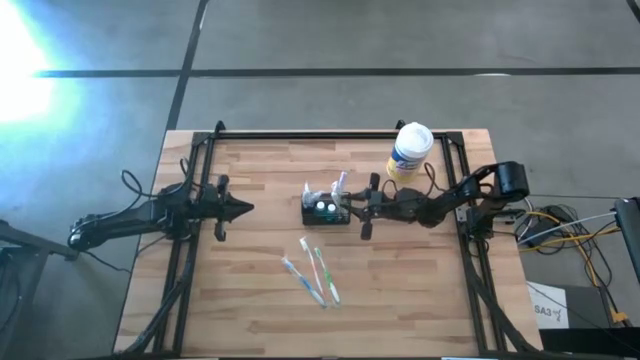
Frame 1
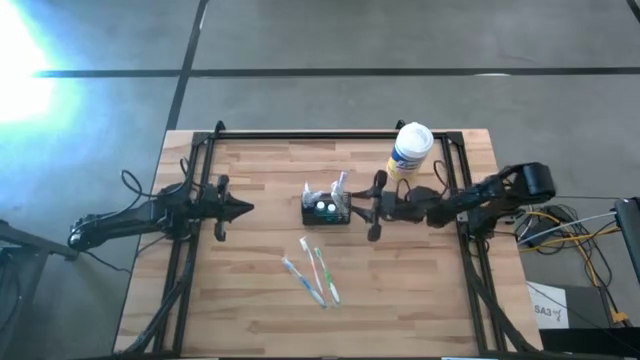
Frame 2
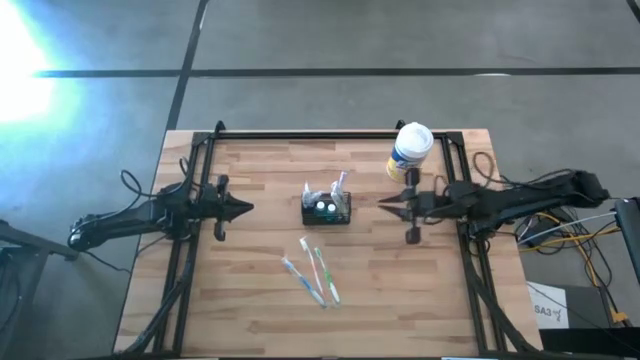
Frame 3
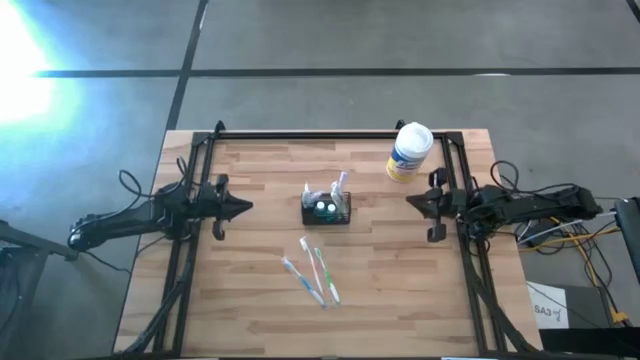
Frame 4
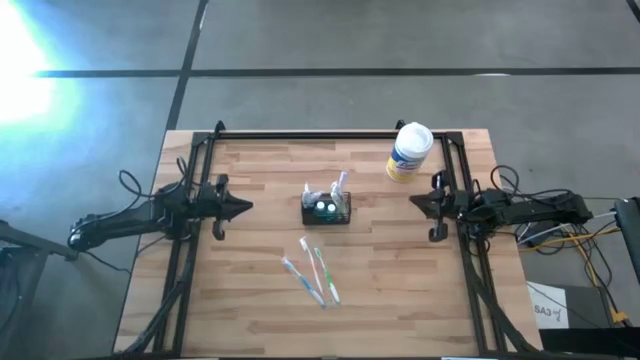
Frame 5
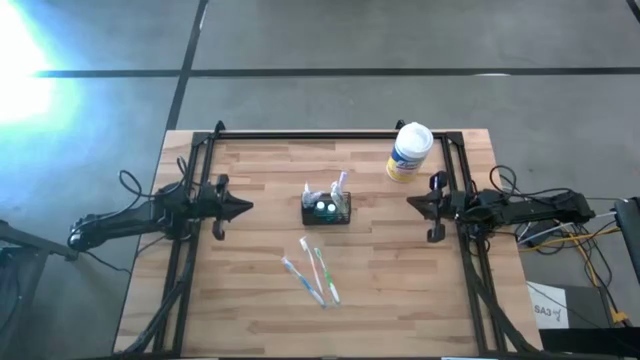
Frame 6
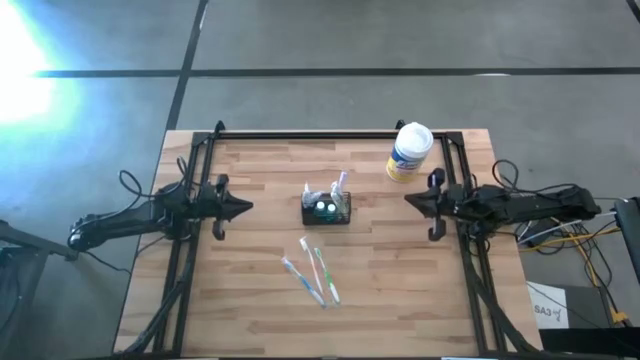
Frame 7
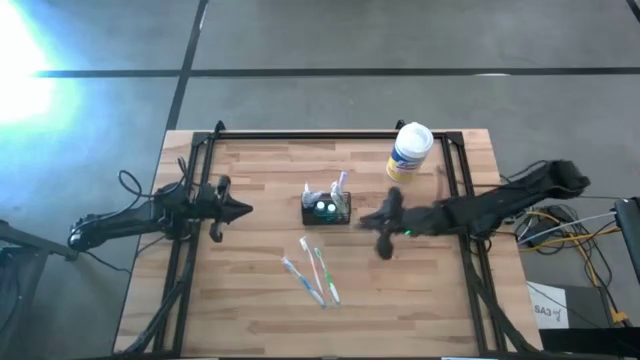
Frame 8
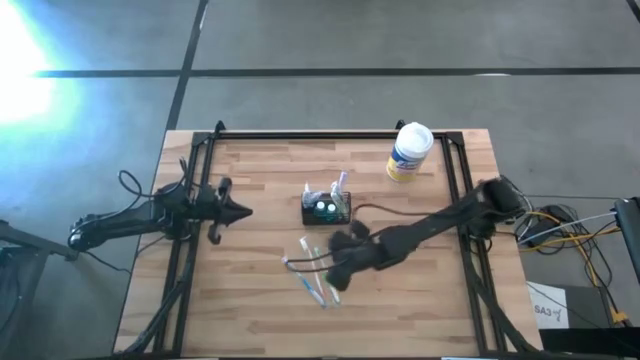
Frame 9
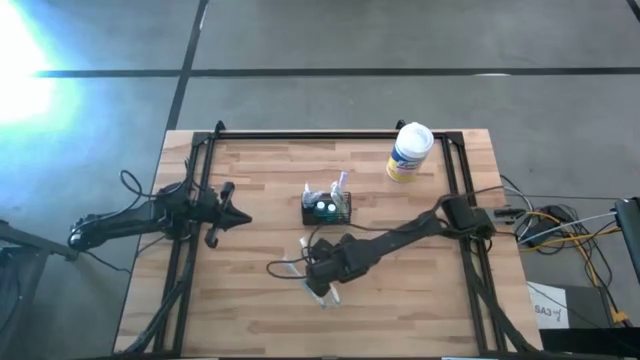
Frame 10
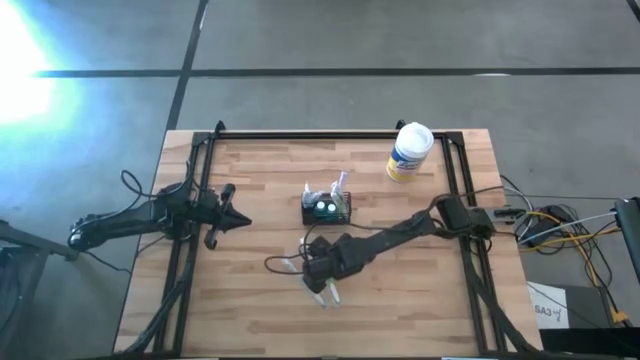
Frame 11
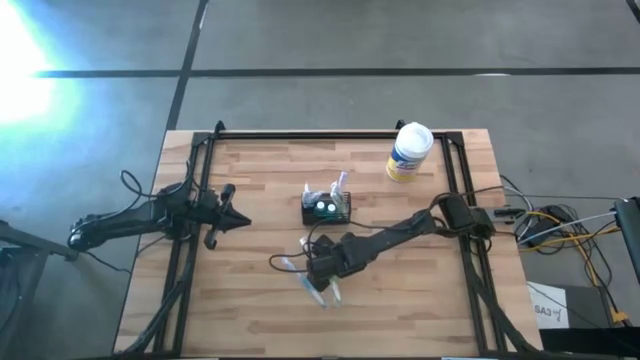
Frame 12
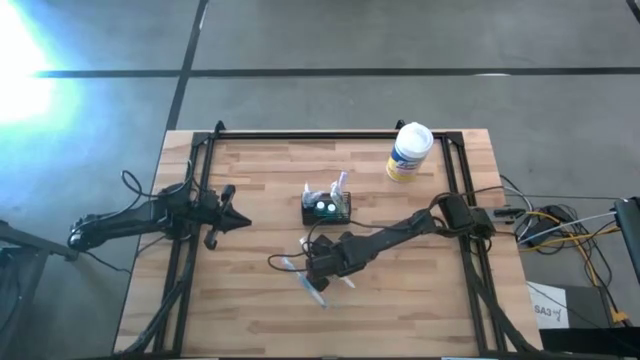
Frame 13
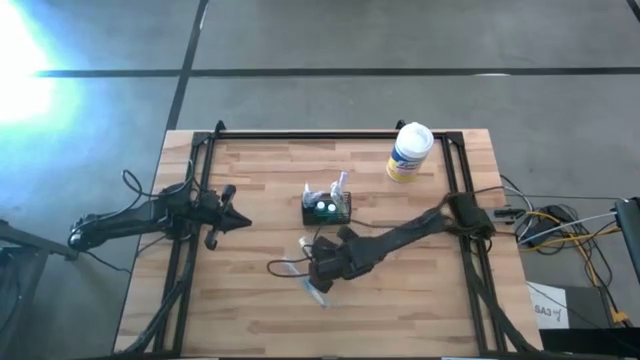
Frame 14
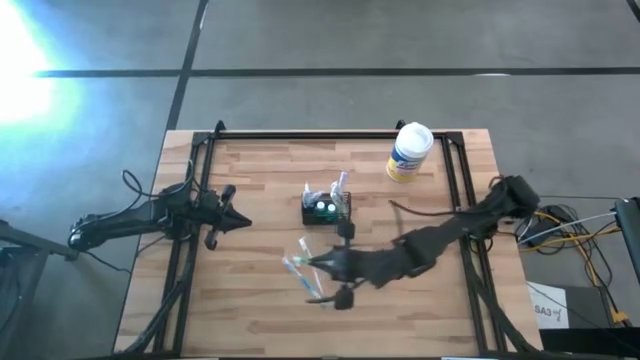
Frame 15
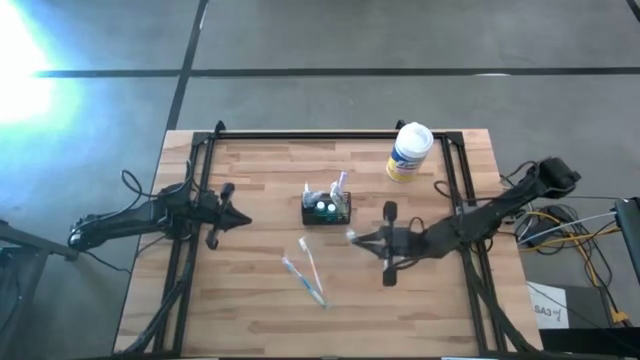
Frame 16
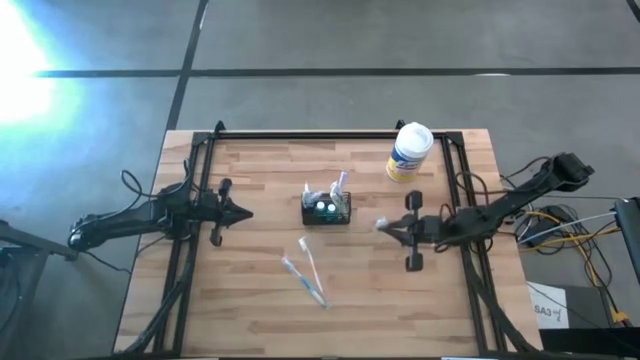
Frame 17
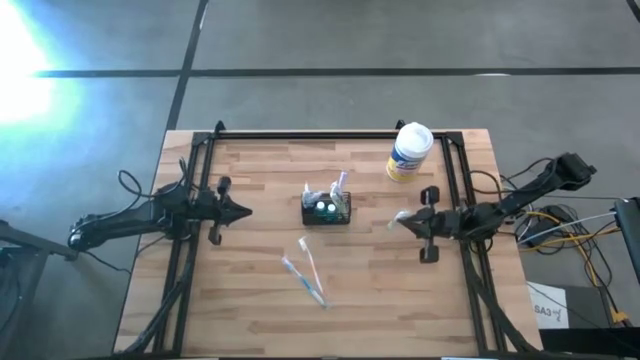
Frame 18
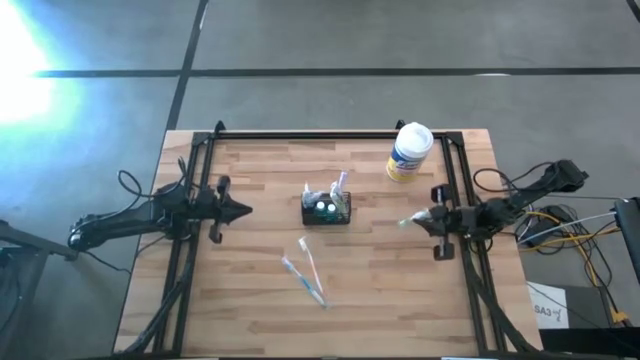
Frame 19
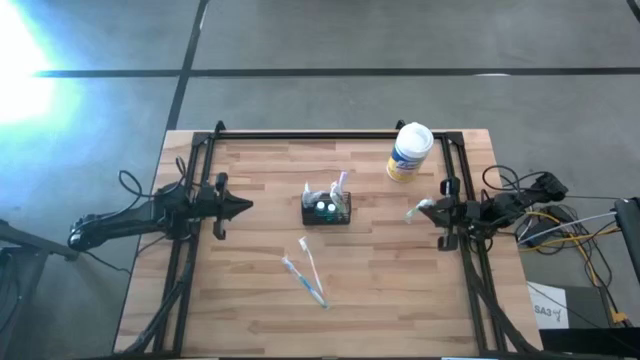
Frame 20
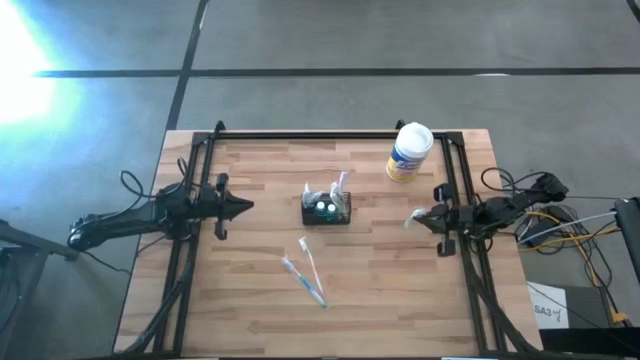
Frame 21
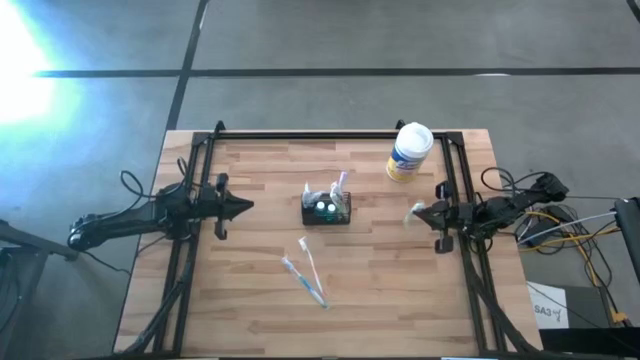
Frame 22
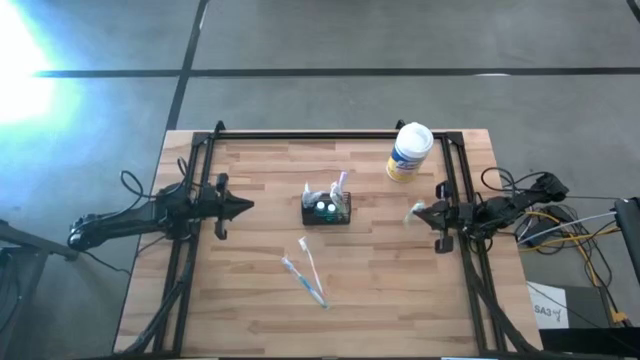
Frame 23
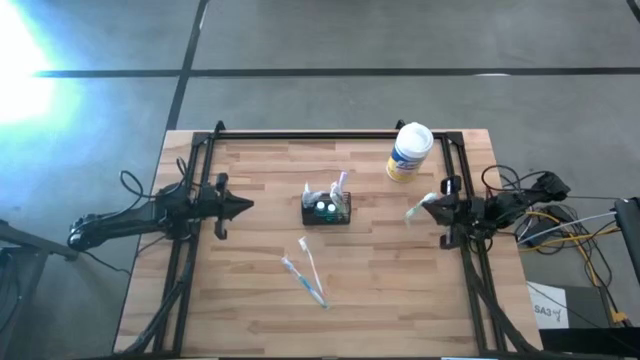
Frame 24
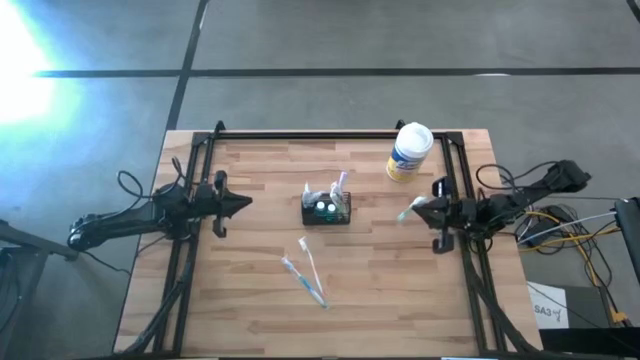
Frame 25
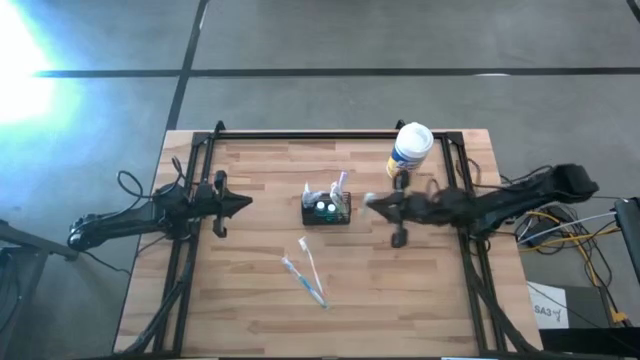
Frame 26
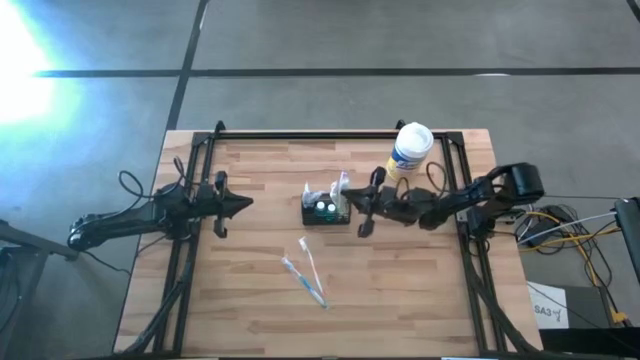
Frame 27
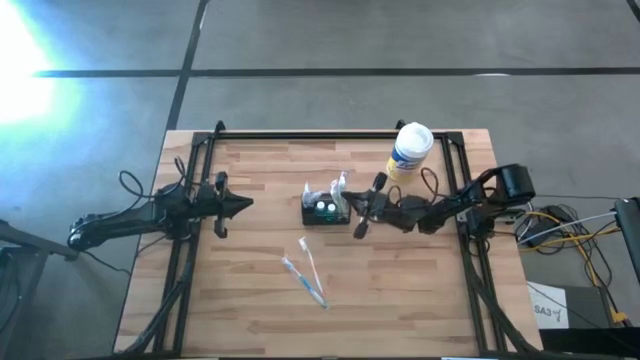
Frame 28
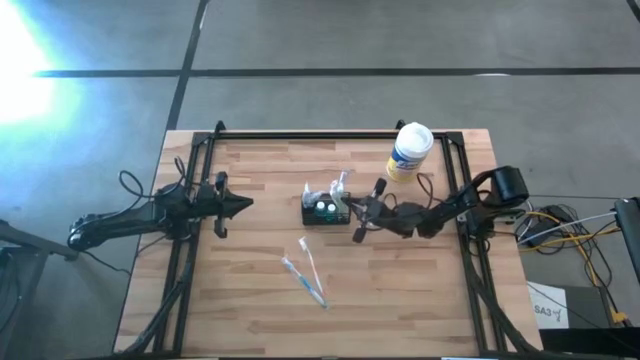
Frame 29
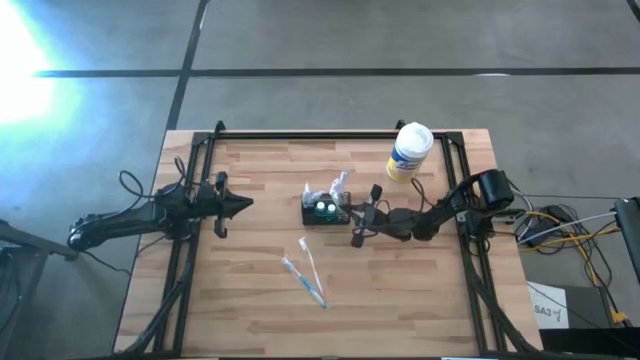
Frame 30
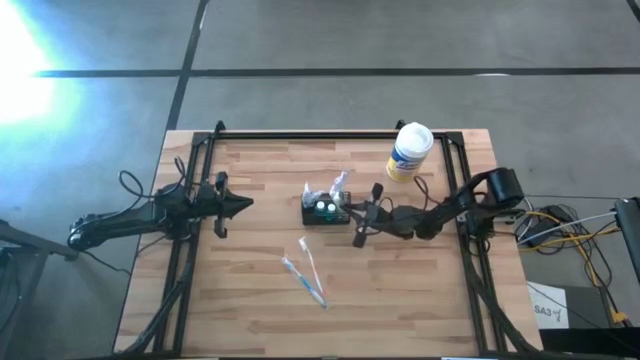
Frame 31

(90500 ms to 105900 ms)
Task: Pick & Place toothbrushing station
Put the green toothbrush into the black wire organizer

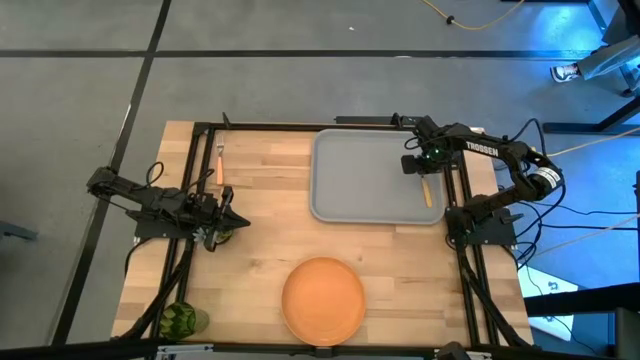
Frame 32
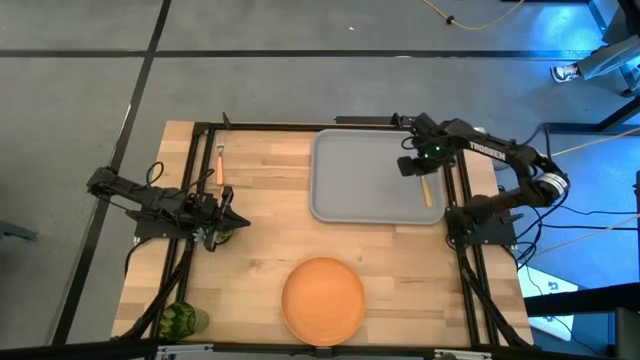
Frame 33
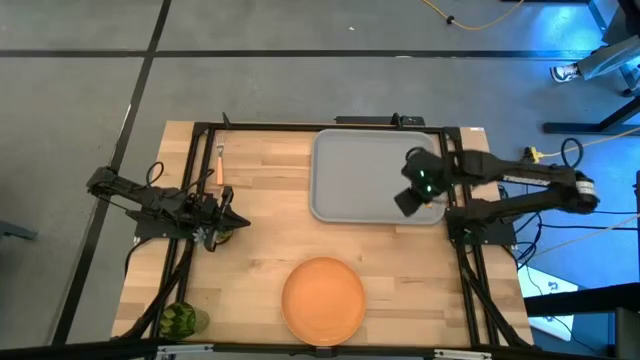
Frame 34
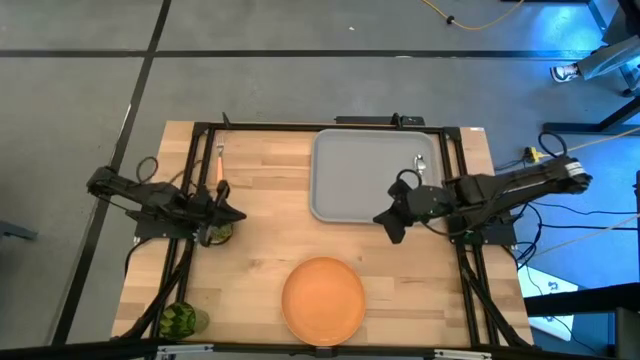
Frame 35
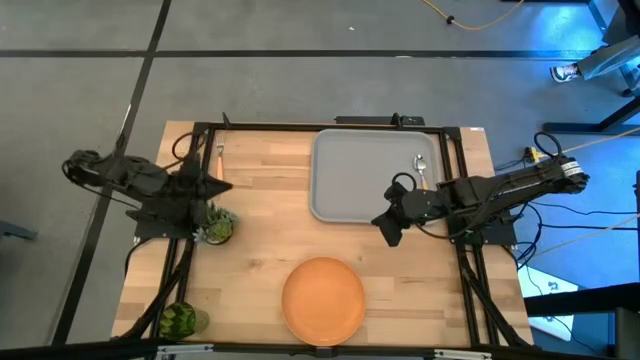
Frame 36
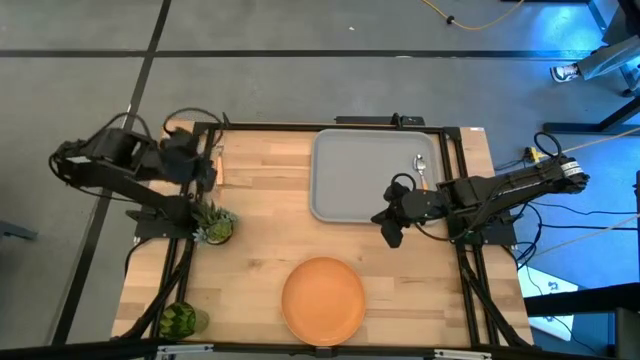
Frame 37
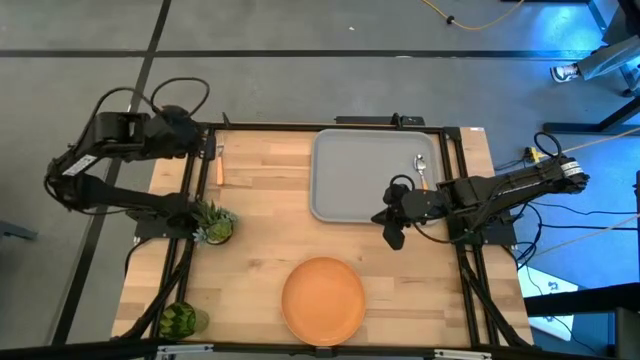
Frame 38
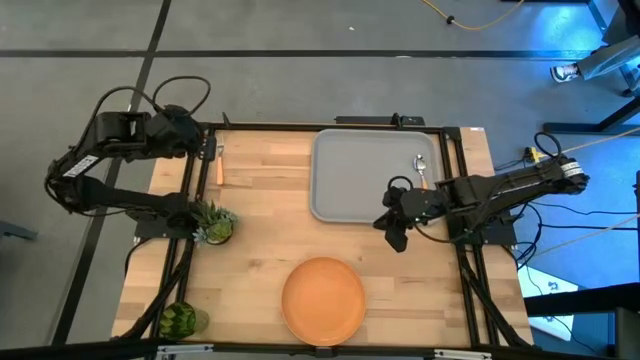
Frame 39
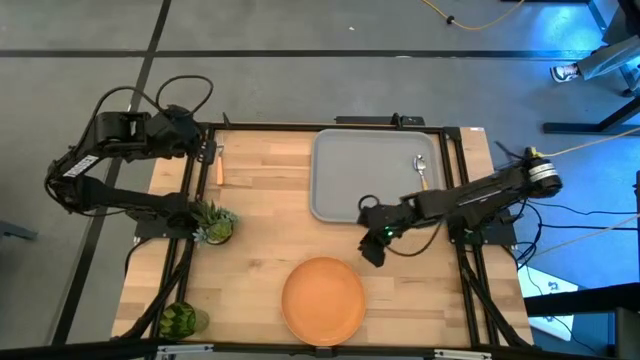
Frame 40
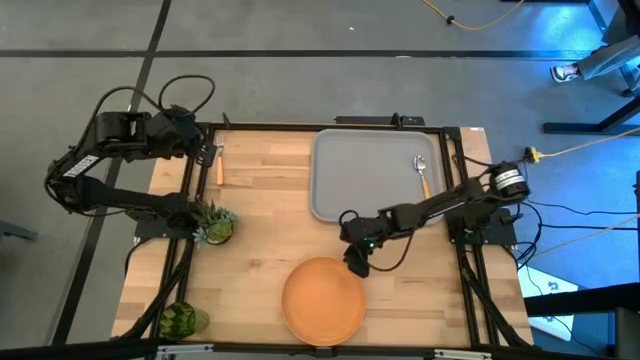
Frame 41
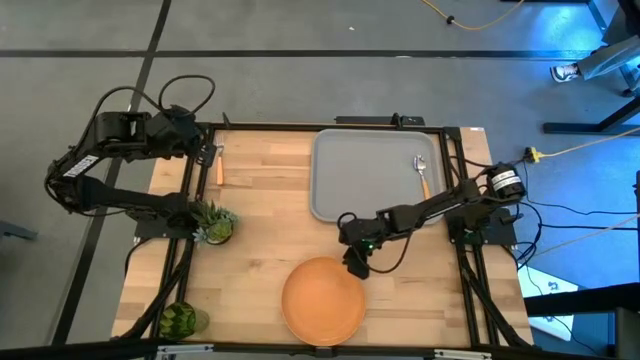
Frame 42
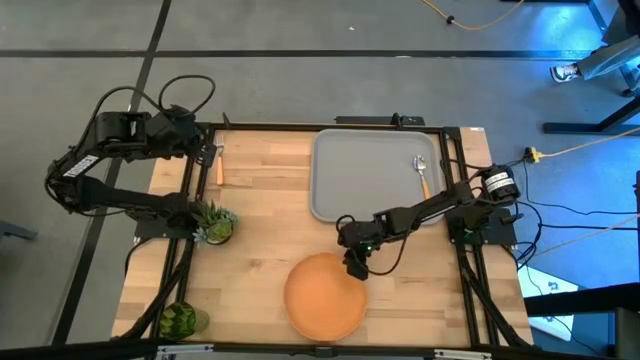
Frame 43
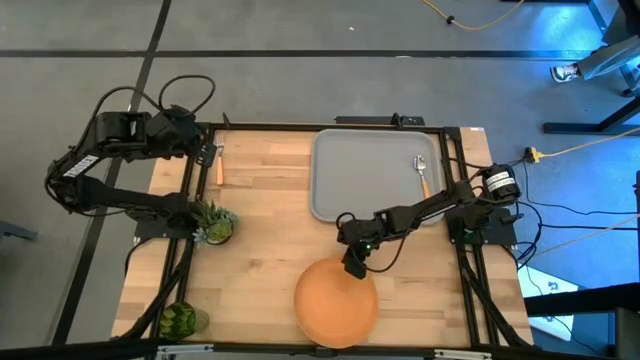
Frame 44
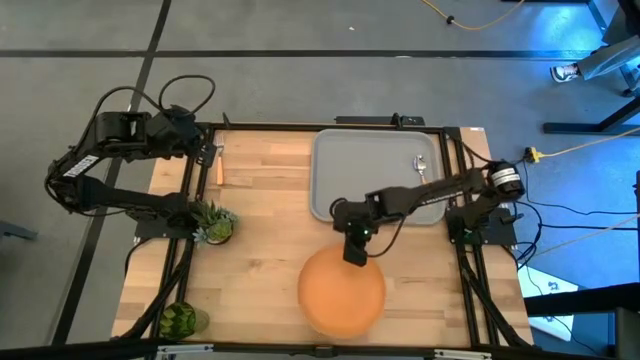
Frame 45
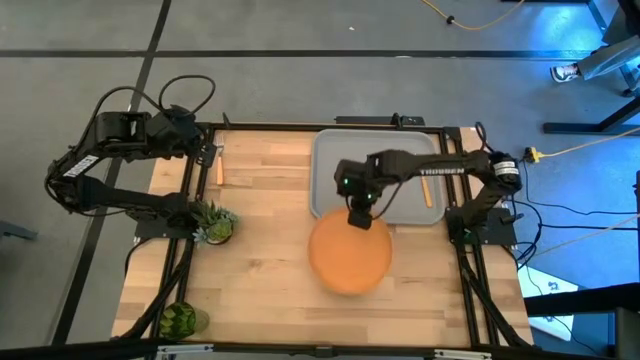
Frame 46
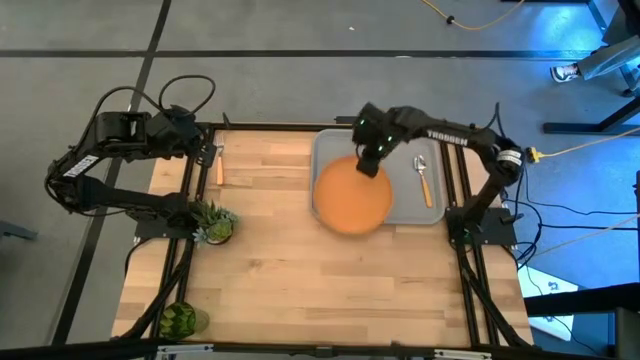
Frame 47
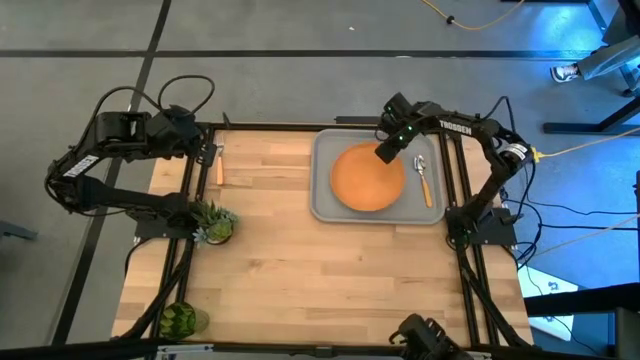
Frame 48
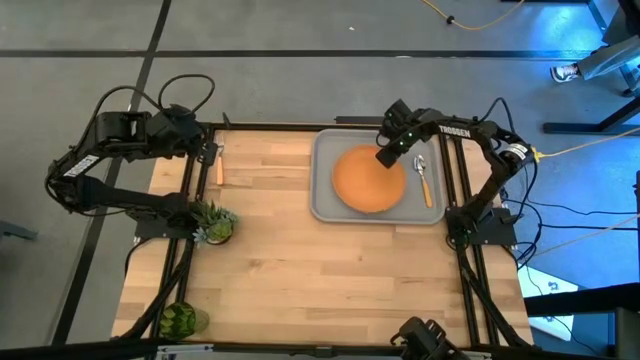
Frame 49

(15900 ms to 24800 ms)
Task: Pick and place plate/cup/fork/spoon on tray
Put the orange plate on the gray food tray
